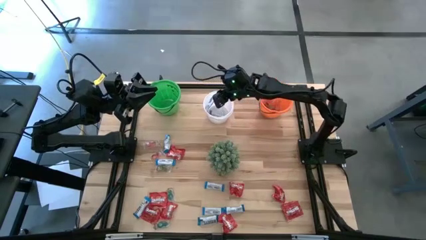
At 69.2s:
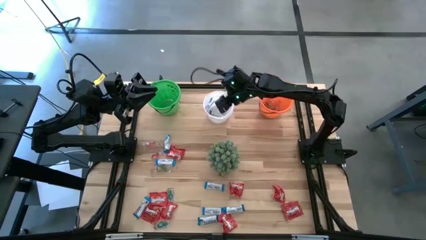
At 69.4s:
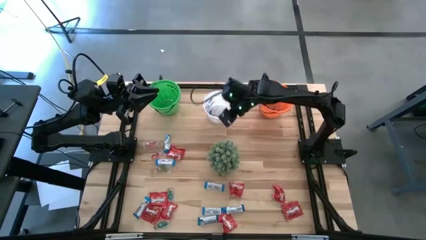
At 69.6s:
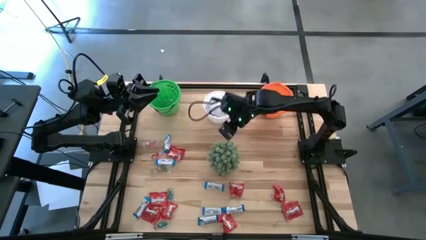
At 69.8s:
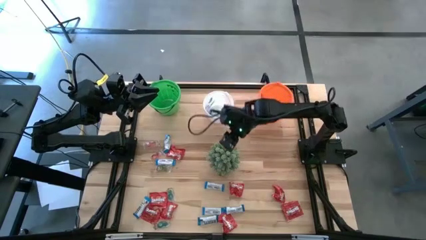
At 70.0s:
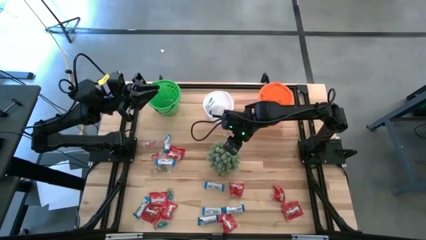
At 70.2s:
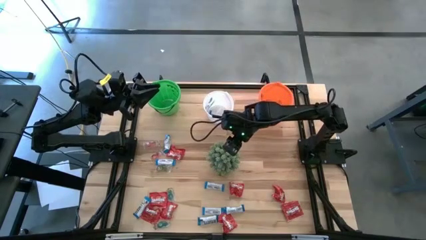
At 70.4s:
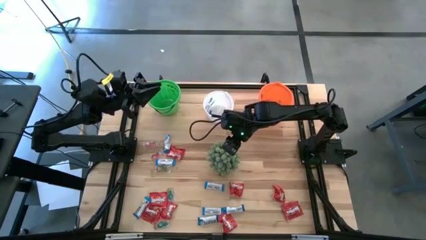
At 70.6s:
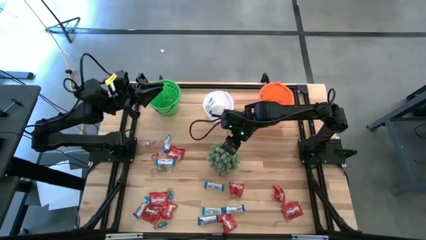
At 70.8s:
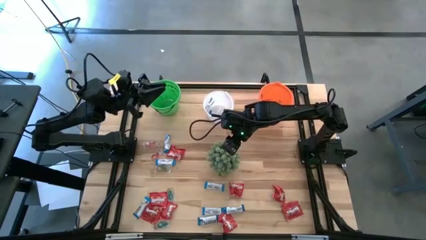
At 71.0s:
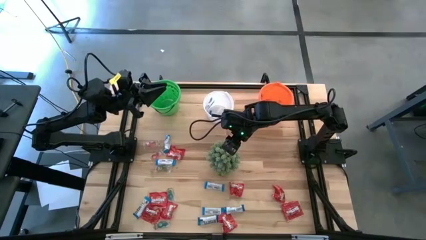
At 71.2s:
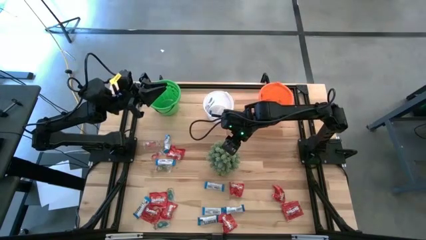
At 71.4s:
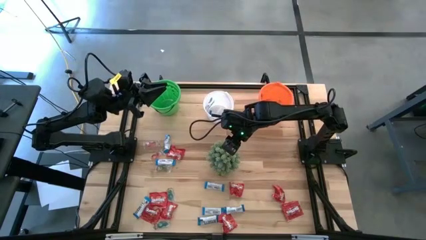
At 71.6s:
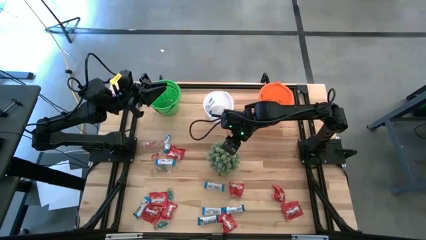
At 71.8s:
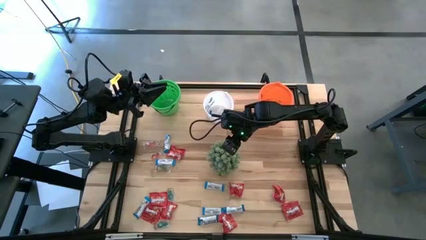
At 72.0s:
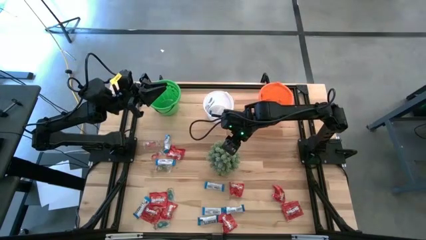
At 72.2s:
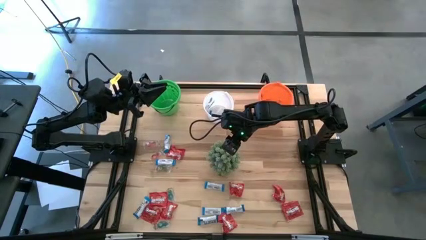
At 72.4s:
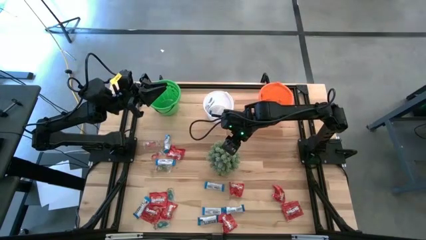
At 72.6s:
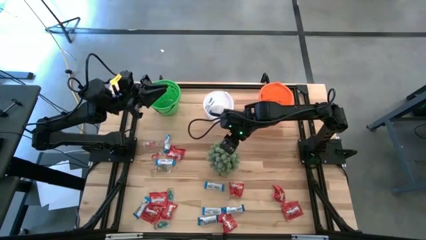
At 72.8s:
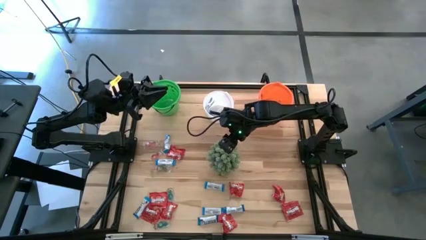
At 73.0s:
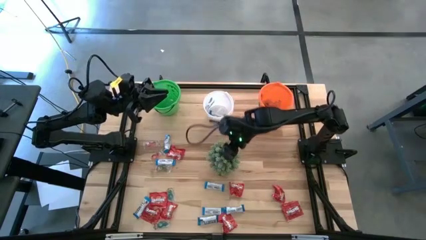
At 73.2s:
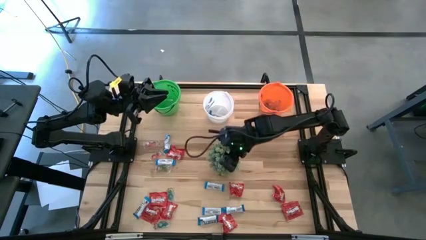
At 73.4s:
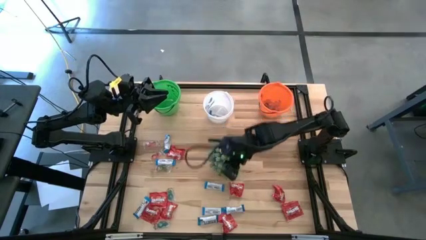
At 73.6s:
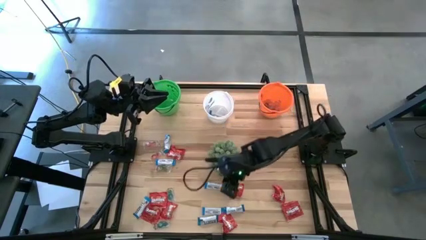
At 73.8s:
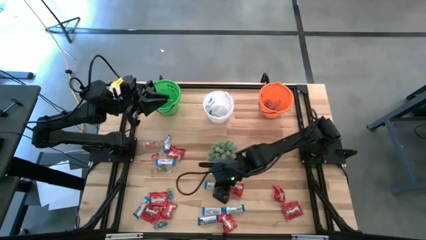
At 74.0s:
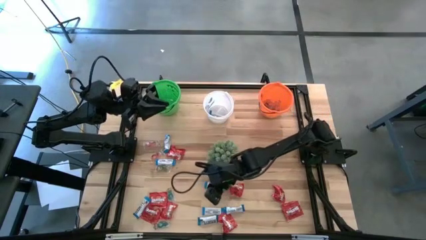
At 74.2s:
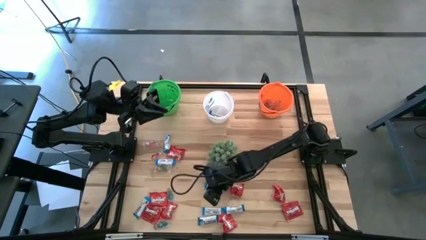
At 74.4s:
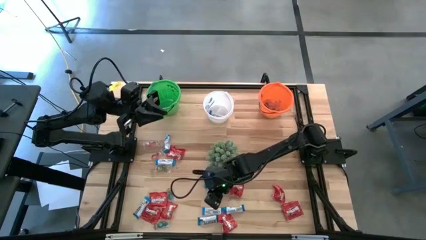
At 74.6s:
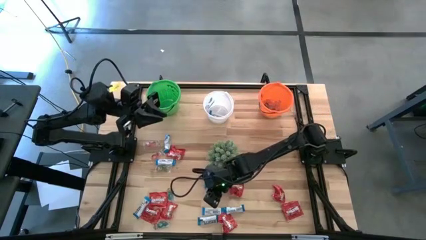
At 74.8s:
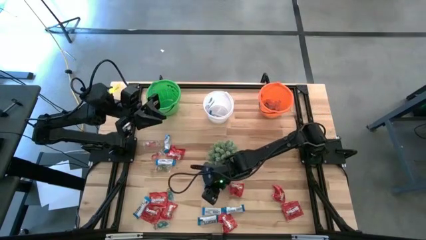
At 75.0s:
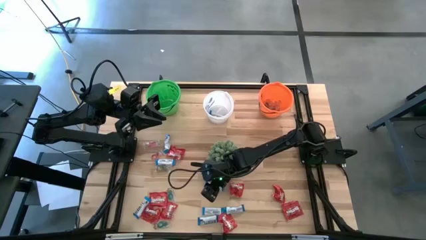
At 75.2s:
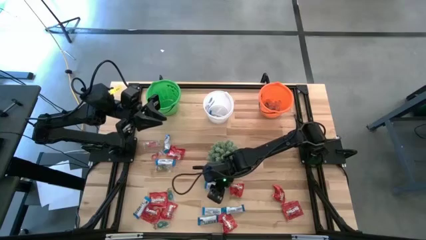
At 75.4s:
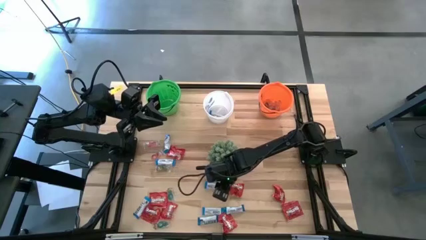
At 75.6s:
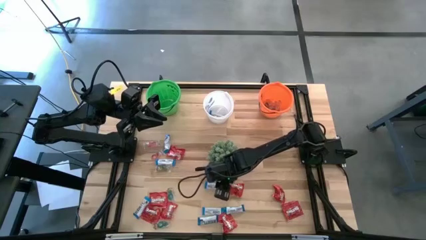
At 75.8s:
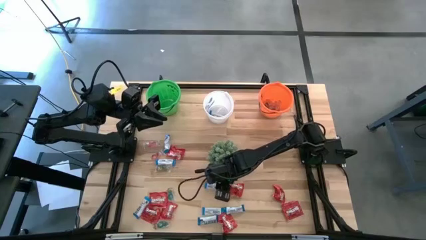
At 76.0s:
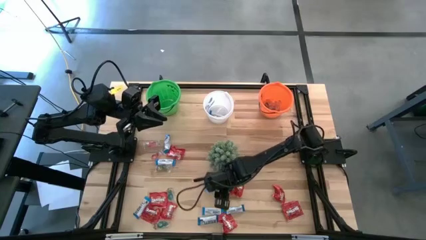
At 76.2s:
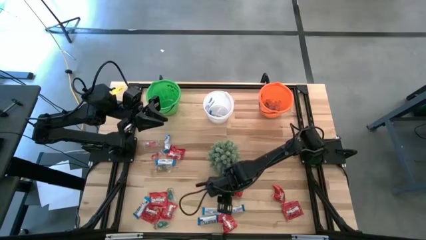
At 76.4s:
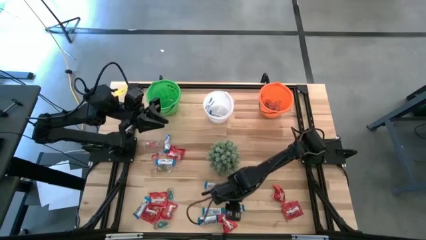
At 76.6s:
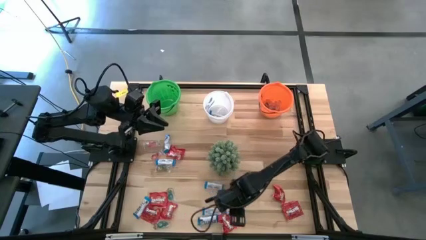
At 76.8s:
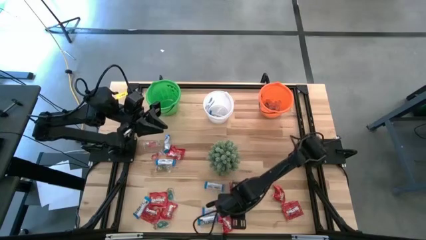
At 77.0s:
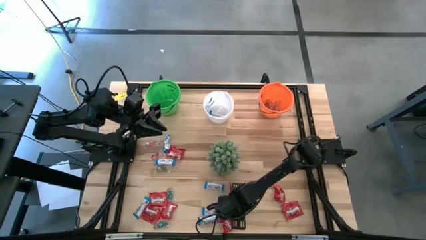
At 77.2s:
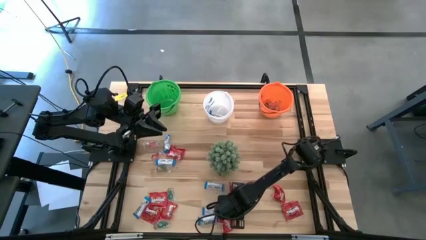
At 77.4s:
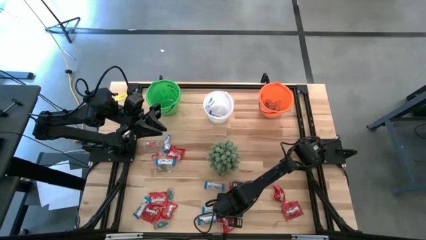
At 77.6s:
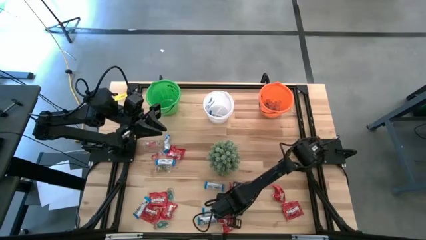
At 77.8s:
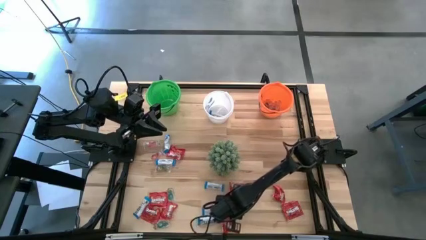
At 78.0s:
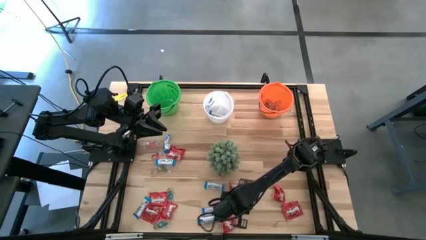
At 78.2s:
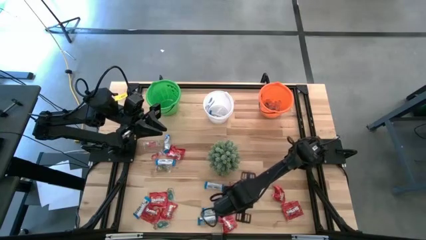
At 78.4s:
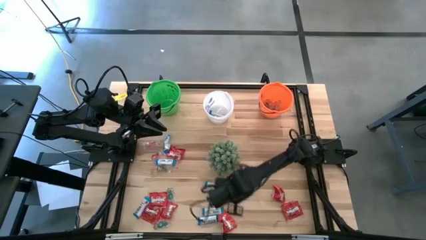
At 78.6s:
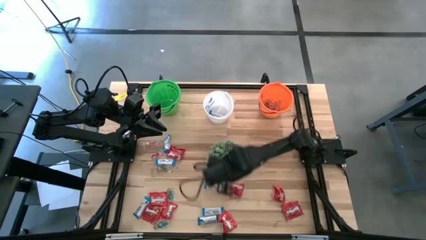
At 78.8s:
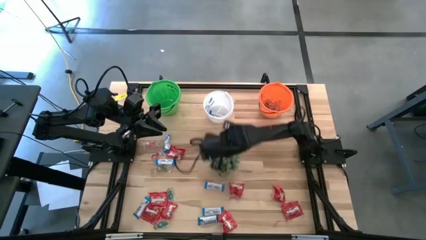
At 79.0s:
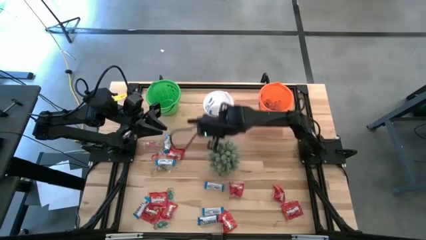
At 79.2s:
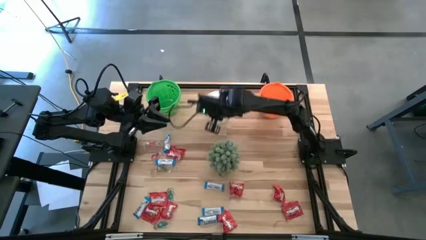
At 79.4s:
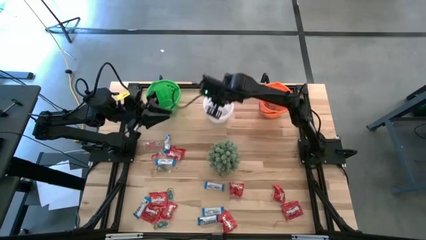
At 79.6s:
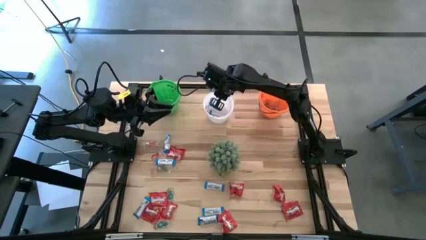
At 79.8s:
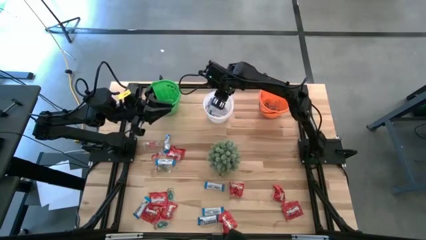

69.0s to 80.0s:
Task: Sort candy
Put the white chocolate bars into the white bucket

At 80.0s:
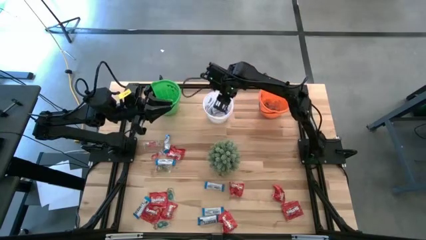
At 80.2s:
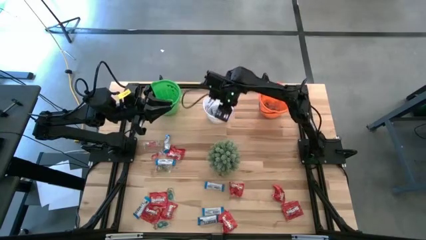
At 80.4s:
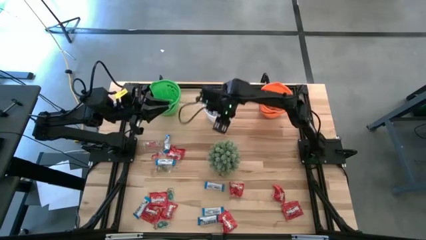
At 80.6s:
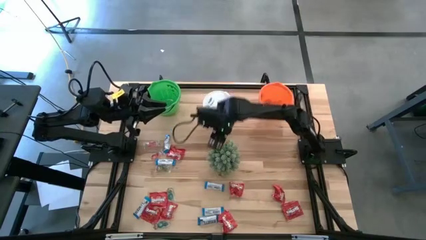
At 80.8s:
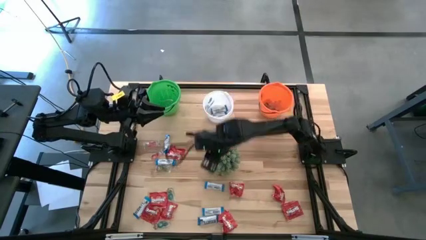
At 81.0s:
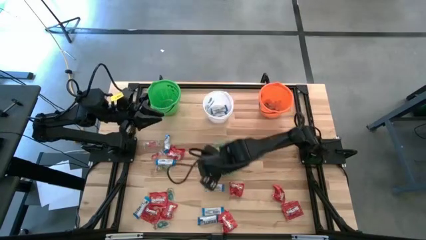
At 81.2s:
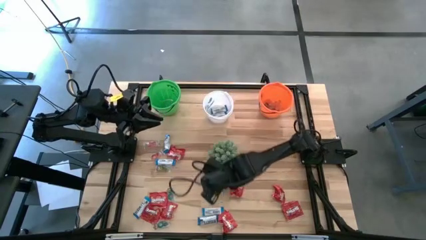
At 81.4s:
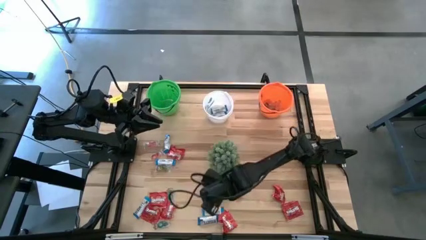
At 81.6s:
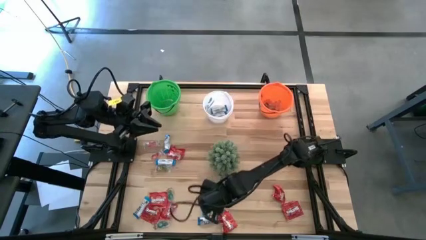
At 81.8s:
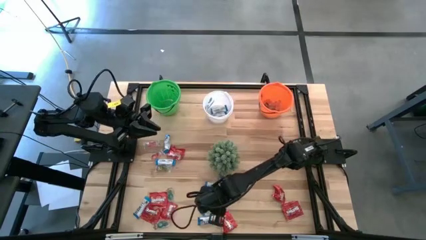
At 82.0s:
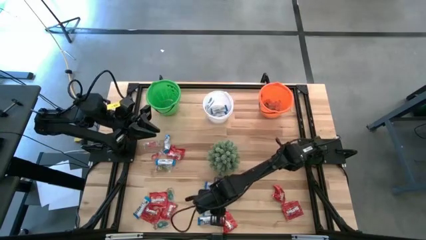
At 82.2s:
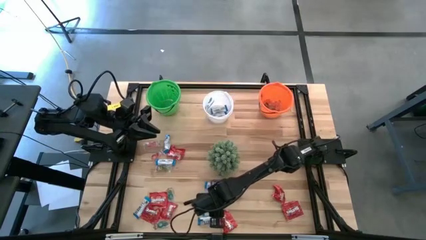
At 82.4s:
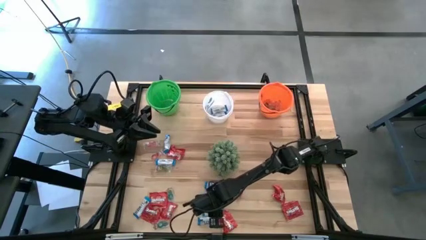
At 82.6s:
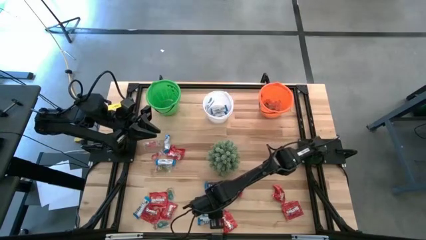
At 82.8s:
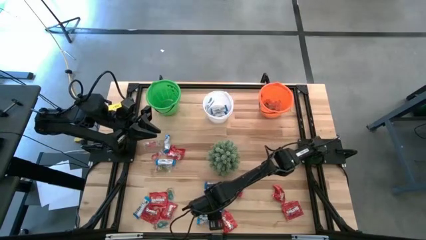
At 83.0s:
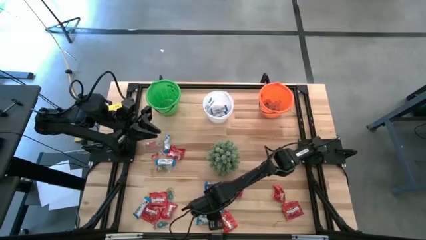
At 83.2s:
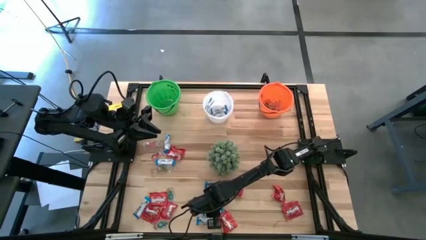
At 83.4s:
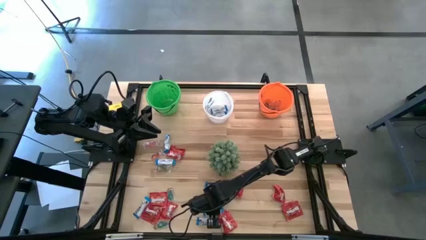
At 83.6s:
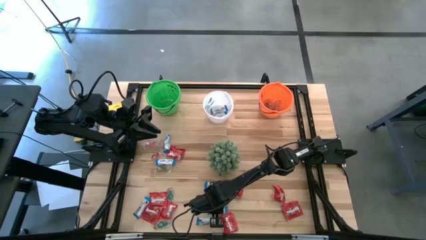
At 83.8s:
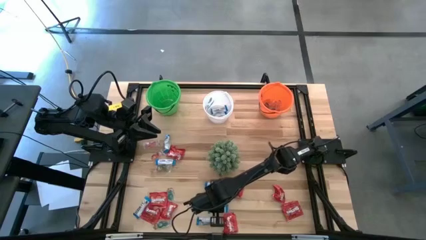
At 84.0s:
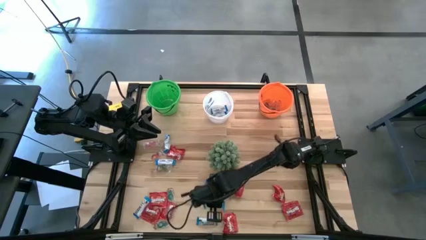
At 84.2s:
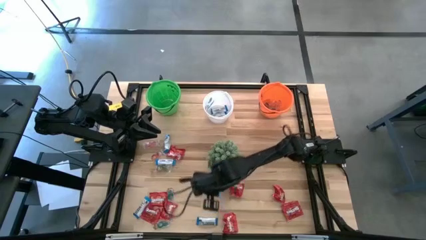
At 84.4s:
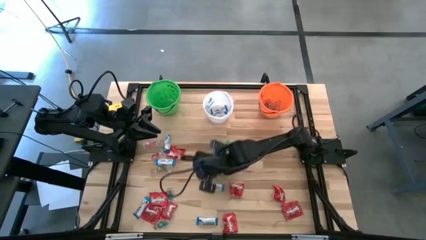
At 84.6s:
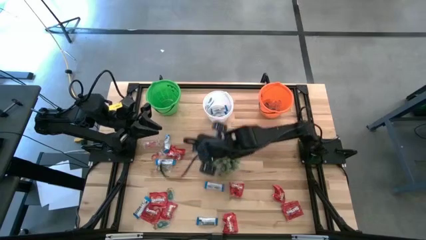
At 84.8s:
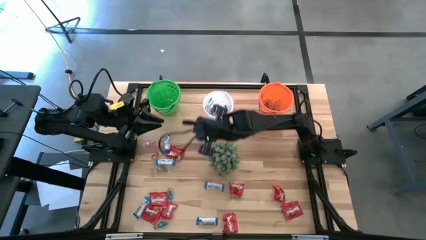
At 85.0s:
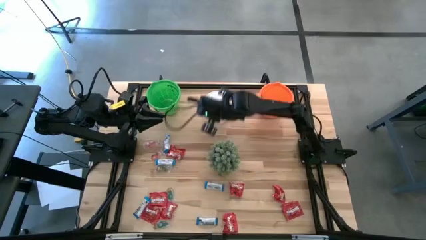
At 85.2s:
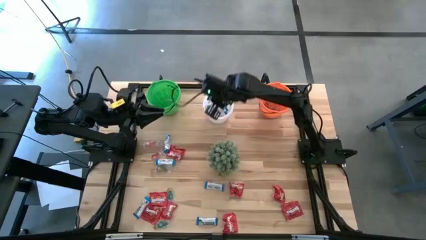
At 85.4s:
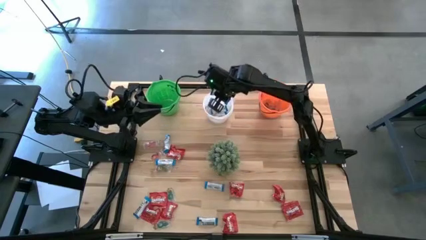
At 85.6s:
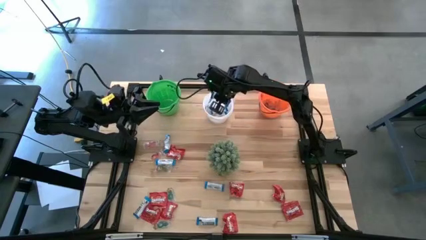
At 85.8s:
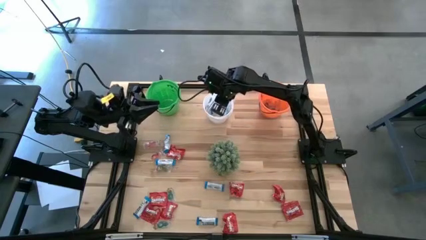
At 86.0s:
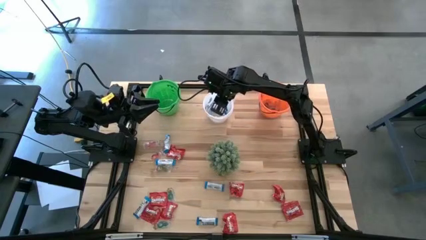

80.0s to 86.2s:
Put the white chocolate bars into the white bucket
